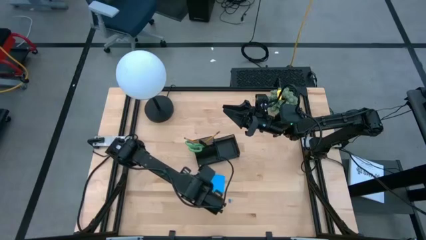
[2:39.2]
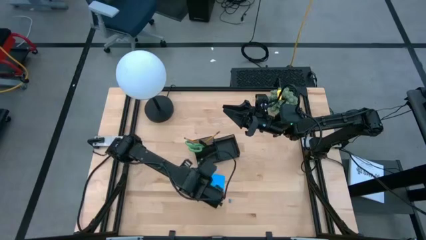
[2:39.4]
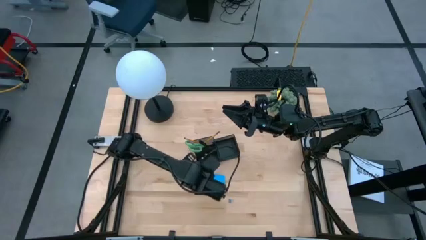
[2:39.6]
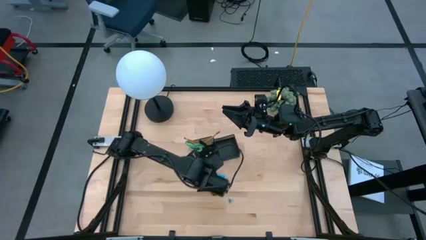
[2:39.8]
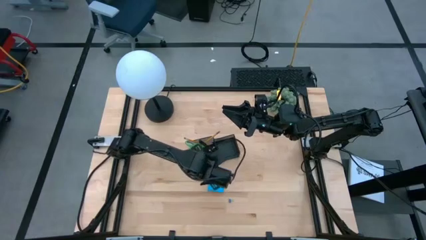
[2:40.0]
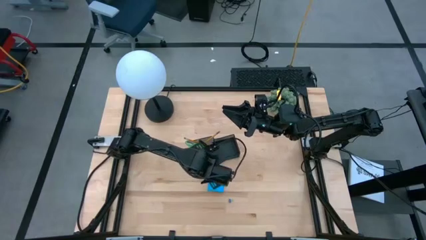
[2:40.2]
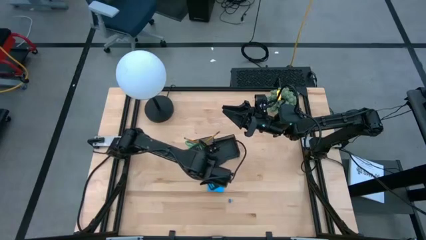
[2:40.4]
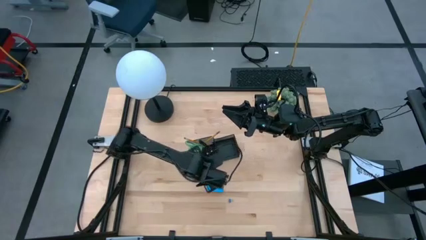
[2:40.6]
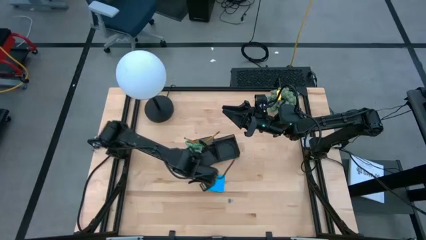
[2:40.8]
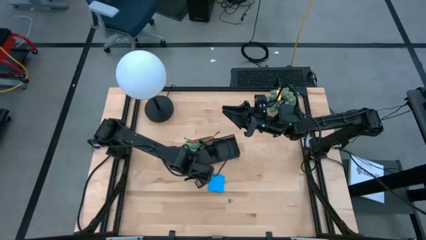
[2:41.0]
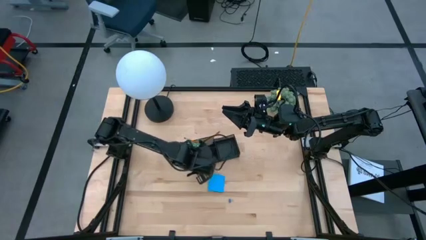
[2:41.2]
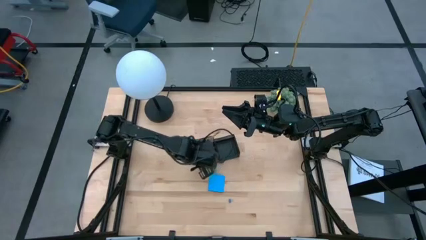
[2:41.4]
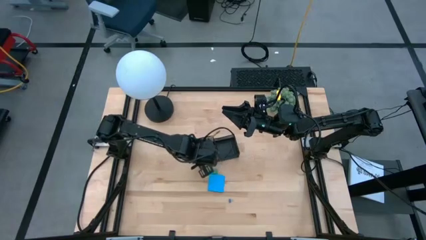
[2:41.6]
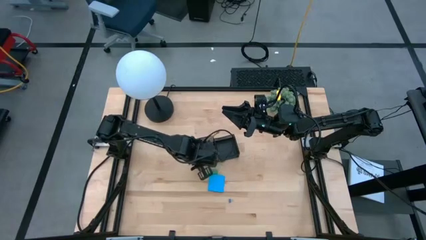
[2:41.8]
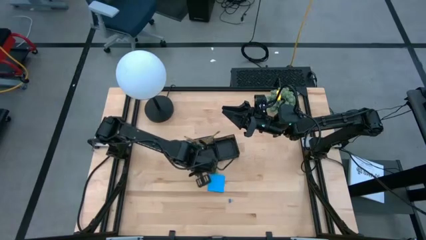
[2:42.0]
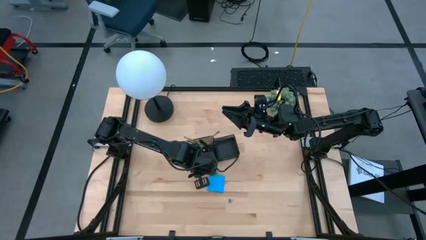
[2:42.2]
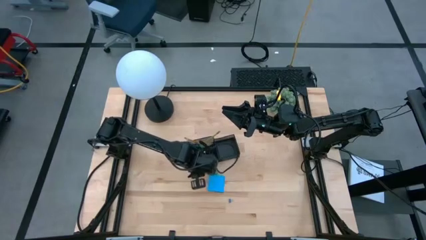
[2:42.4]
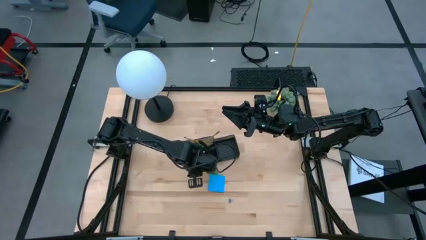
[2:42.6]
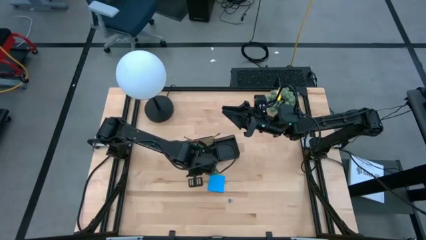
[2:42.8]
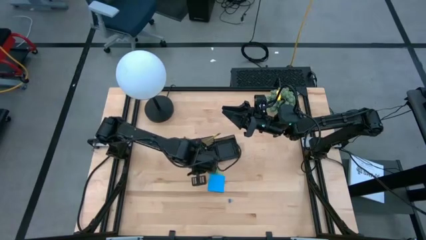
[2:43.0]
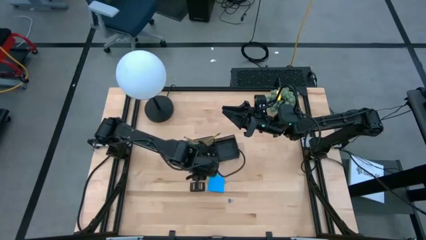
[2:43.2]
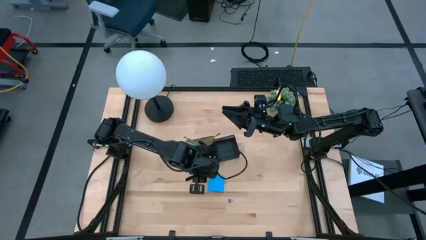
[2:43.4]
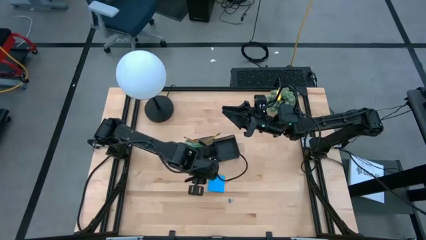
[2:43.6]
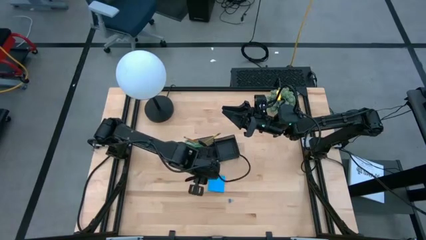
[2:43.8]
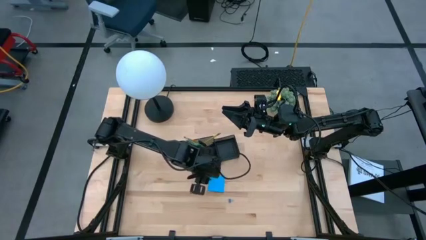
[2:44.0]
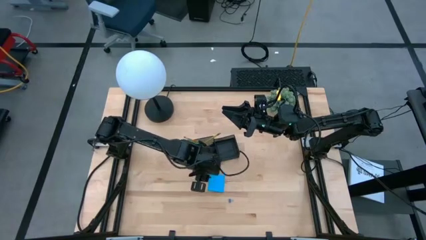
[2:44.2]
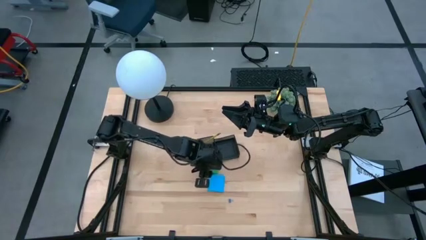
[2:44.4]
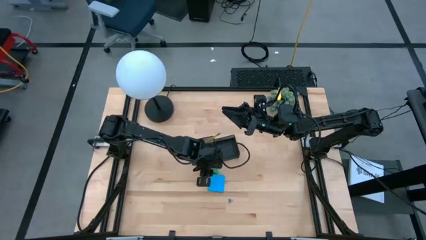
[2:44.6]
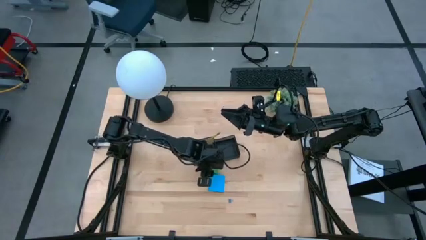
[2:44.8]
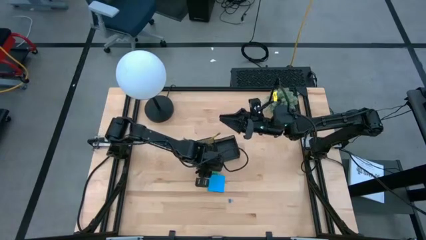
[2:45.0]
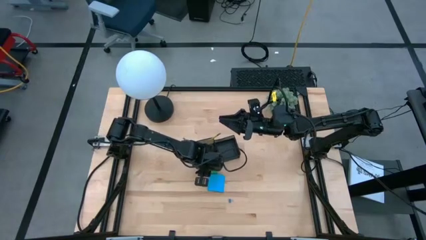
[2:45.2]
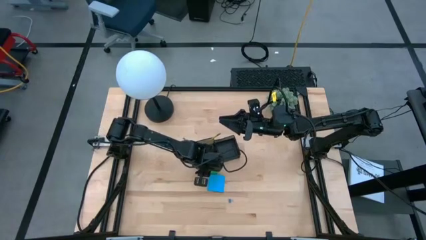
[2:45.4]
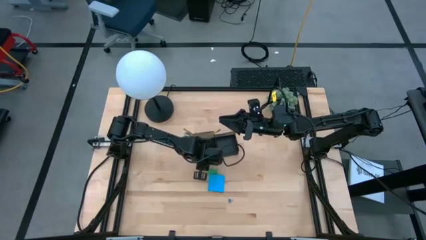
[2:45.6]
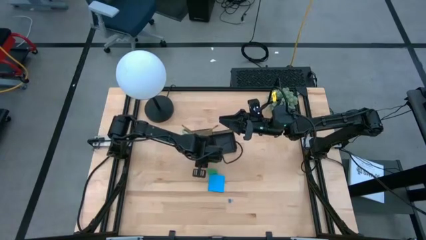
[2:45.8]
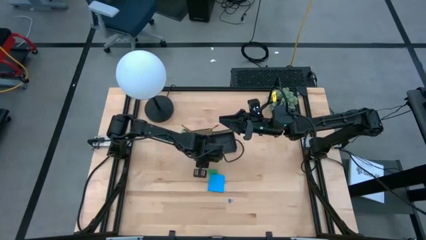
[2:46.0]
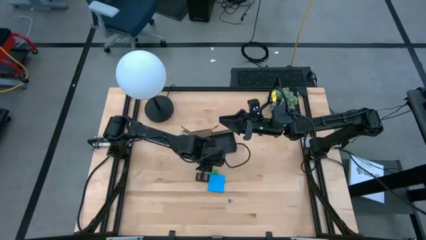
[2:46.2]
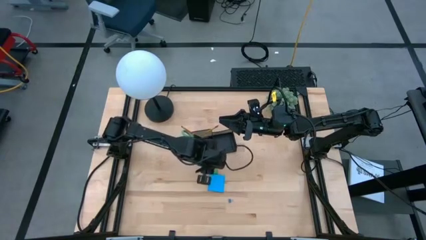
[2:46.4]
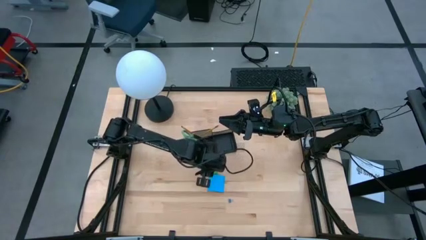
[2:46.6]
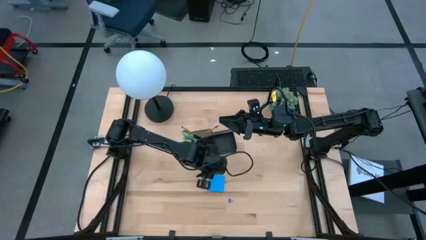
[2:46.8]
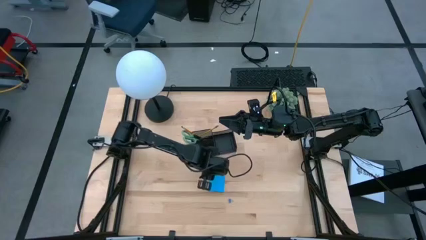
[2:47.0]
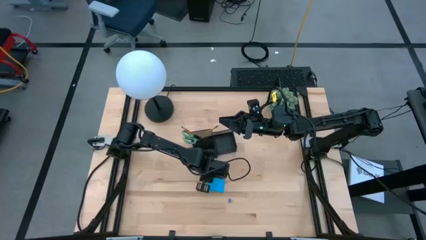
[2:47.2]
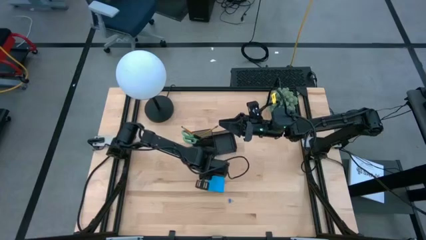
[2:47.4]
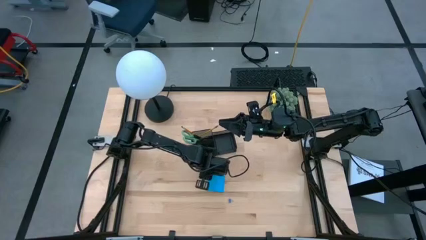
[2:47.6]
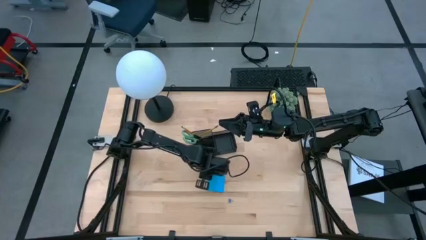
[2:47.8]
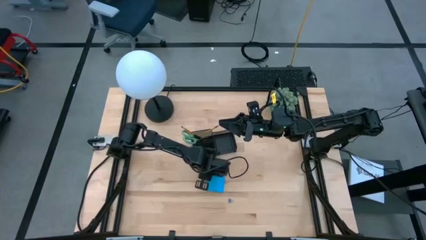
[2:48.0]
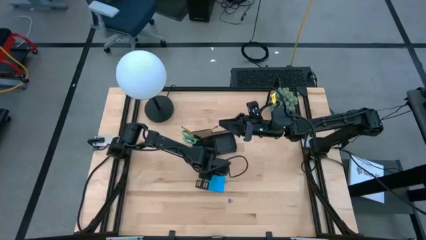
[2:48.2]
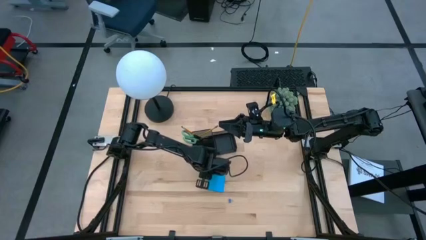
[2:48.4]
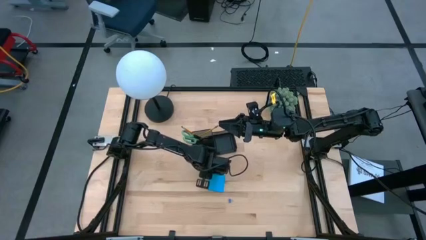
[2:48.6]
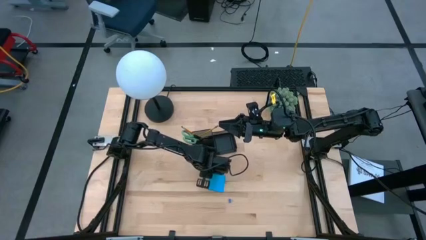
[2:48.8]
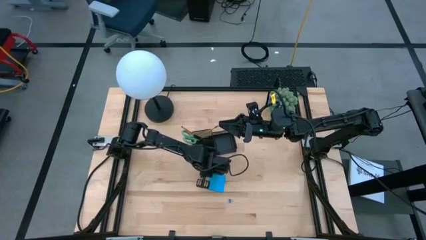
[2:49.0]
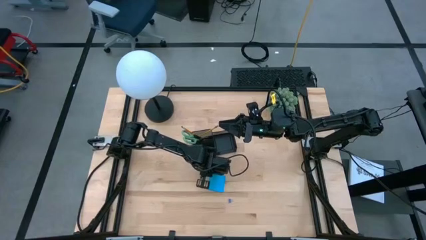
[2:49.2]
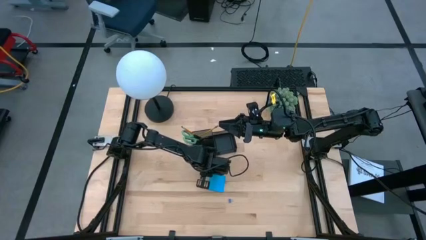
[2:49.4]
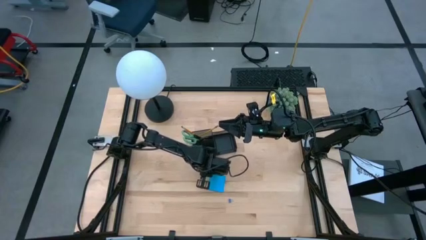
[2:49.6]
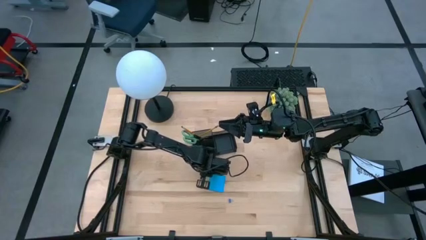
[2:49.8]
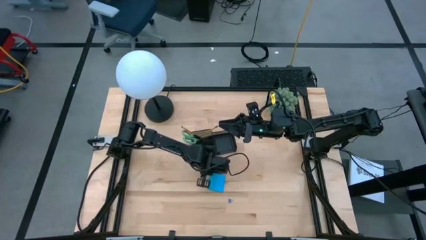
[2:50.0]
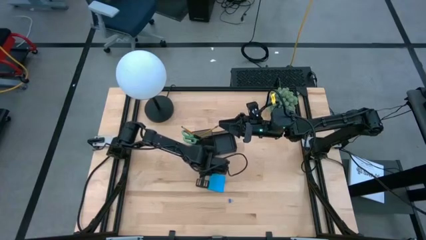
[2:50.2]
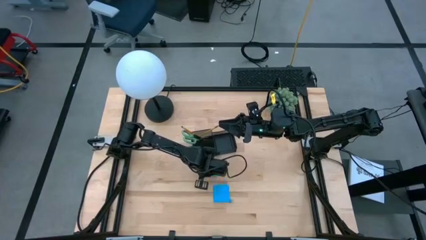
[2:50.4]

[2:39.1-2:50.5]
Task: Pick and place office supplies into organizer
Put the green eraser into the black desk organizer

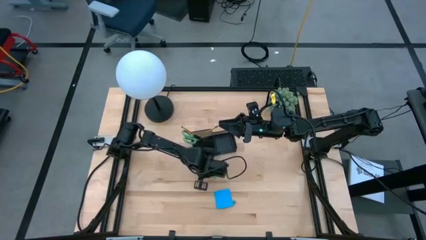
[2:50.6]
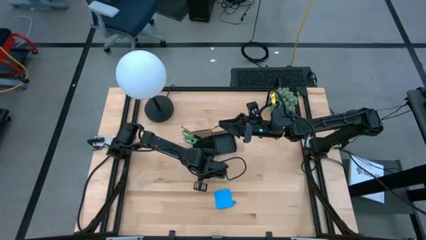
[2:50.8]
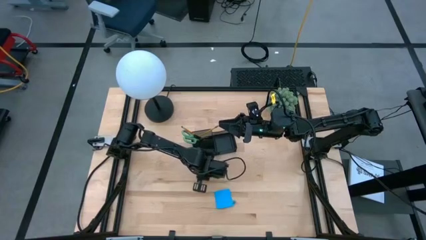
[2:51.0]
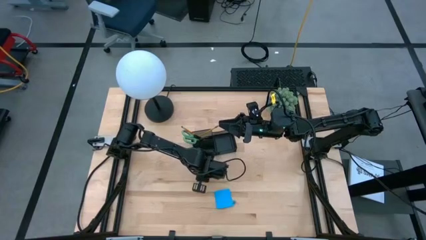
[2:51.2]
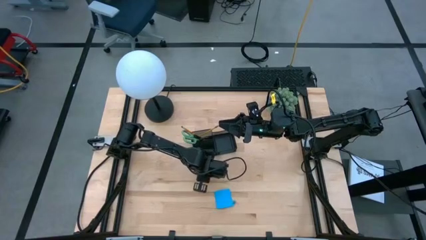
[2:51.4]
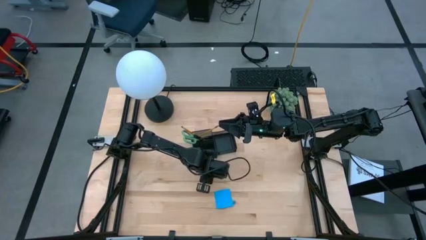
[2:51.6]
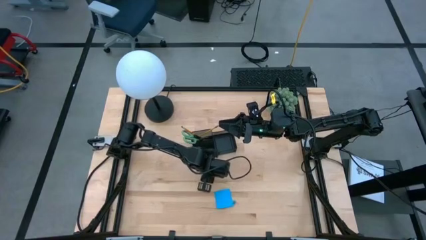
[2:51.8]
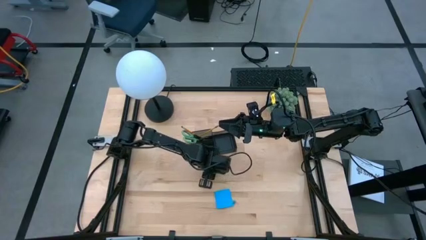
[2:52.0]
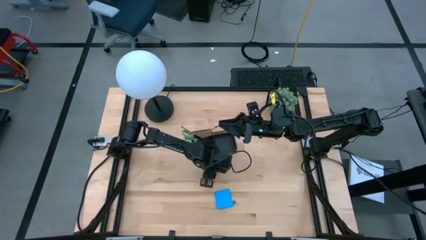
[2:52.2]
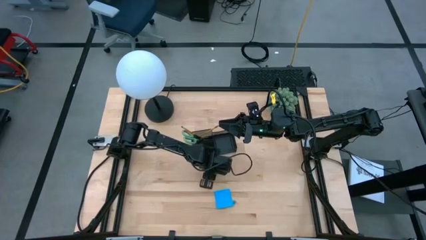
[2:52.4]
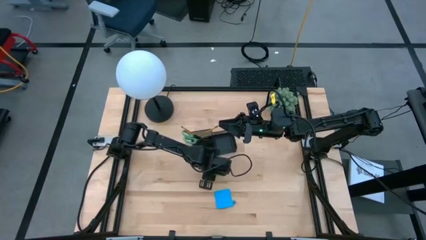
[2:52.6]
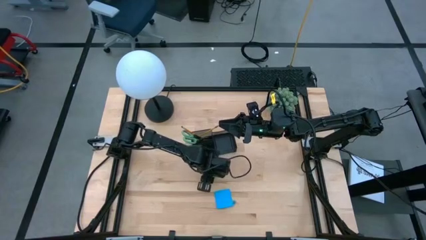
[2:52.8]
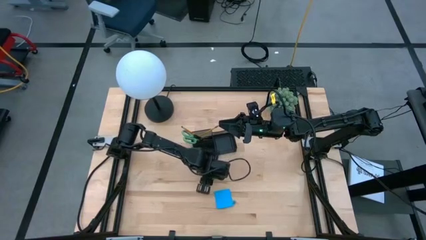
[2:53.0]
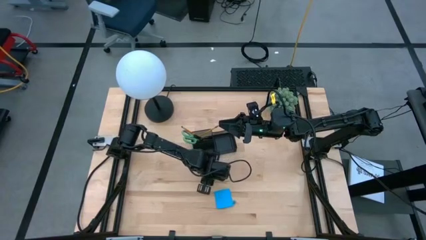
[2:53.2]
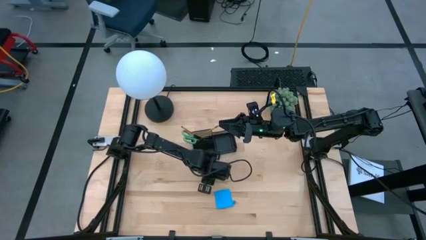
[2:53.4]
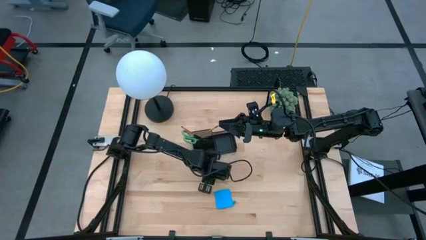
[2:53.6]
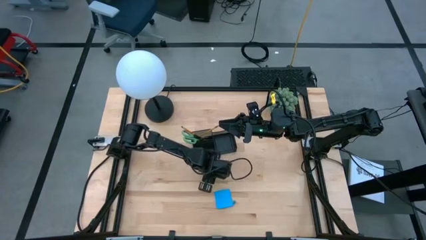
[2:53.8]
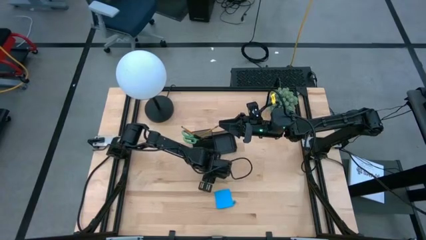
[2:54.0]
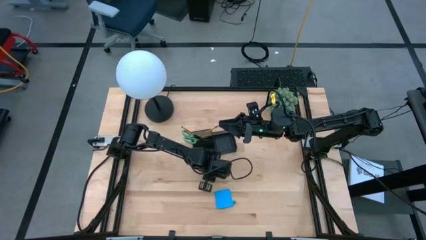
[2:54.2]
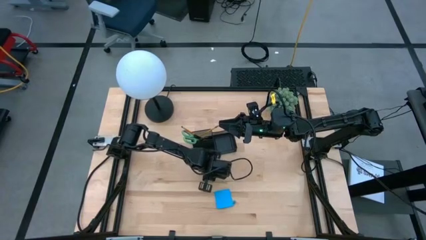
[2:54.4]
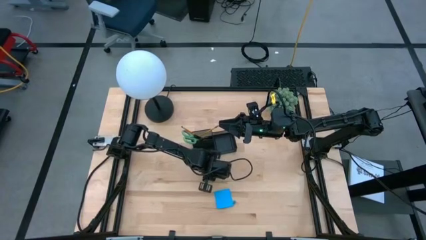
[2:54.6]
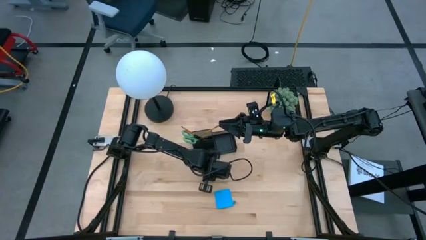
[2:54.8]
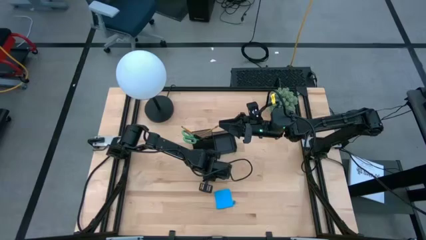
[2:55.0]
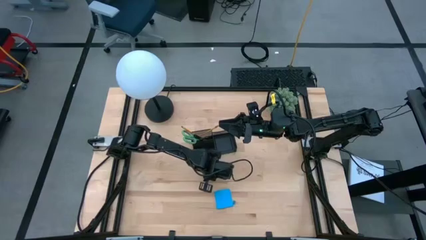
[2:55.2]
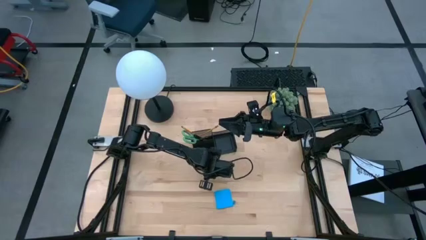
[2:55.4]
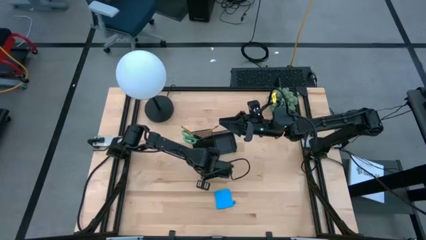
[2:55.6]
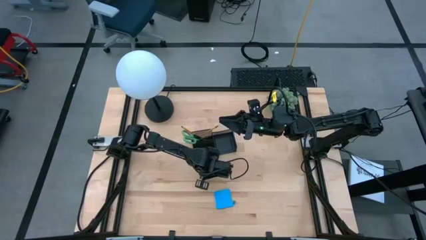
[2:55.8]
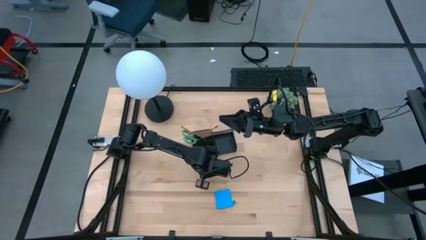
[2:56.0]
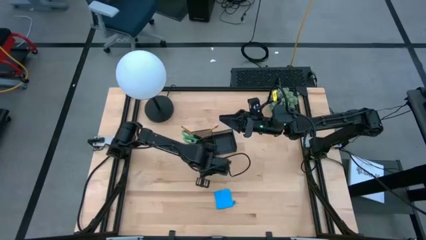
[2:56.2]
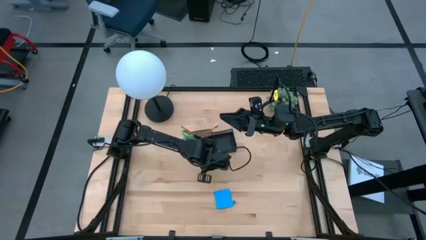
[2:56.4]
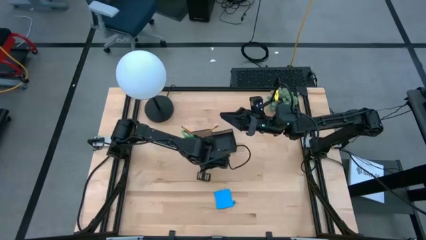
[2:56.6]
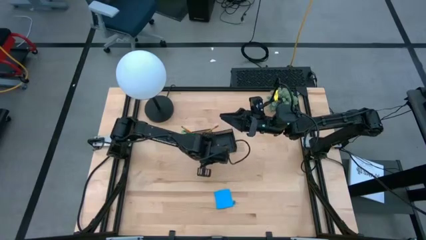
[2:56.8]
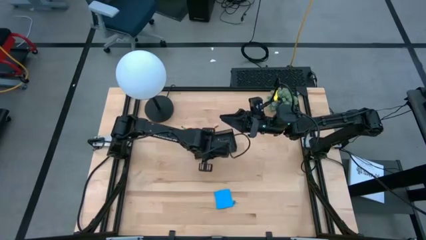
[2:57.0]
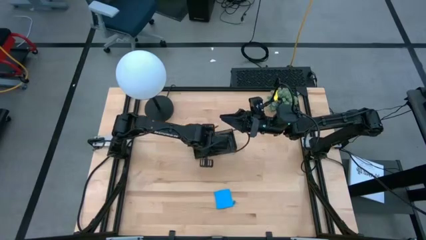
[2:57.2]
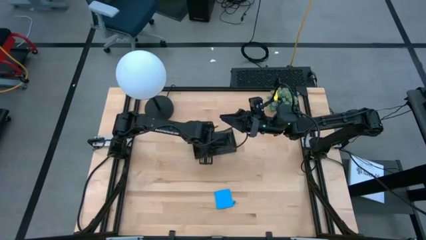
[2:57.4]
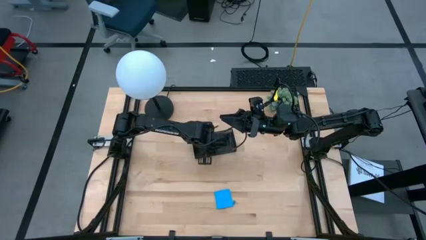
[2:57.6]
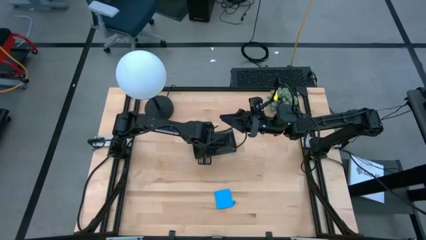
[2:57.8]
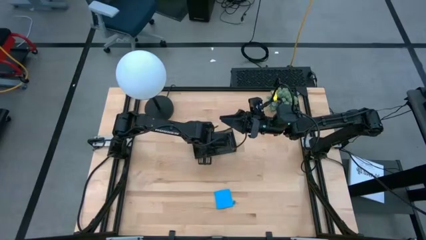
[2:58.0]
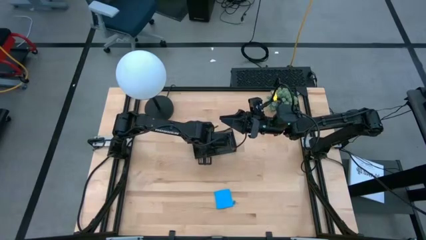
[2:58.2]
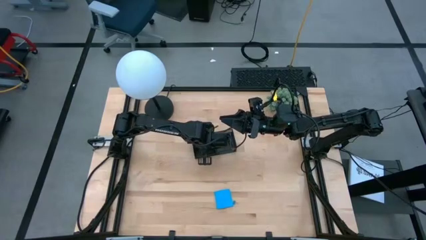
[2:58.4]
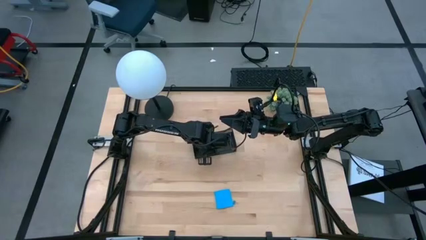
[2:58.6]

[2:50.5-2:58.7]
Put the green eraser into the black desk organizer
